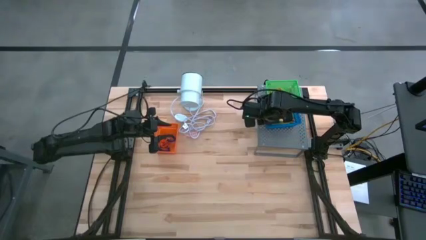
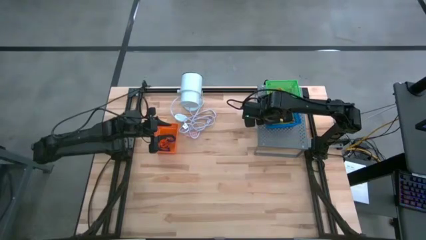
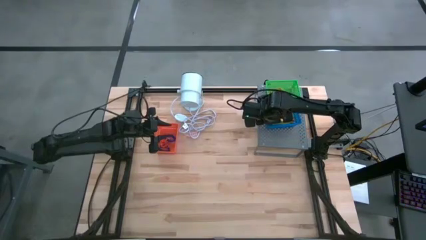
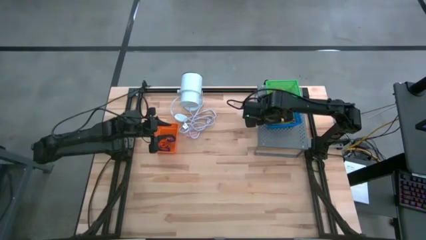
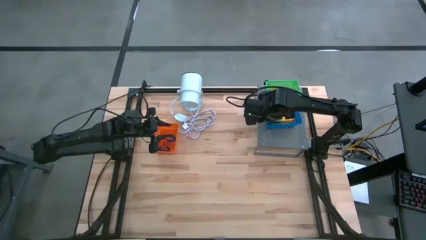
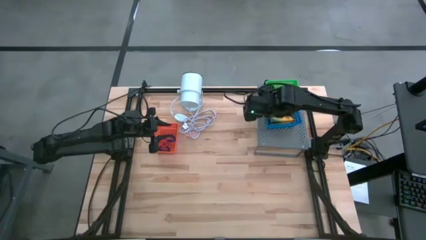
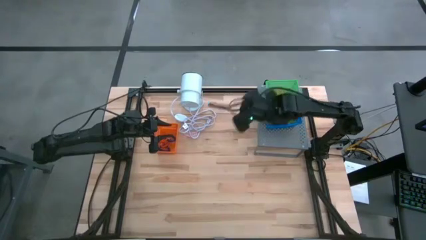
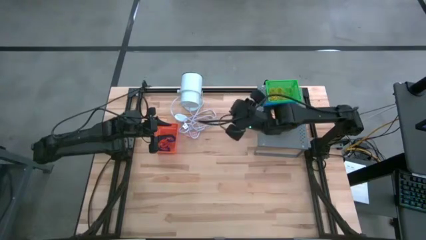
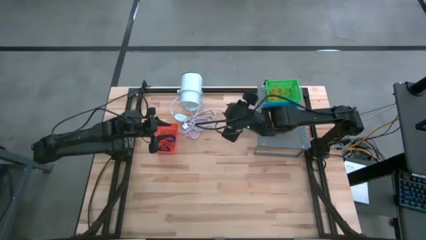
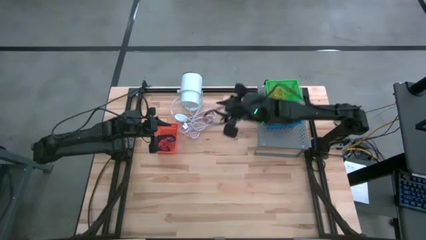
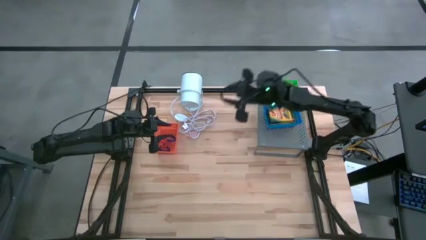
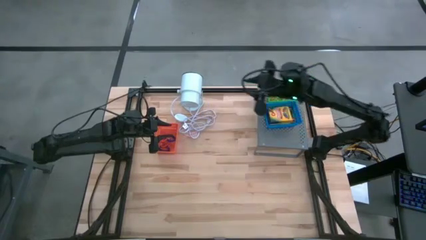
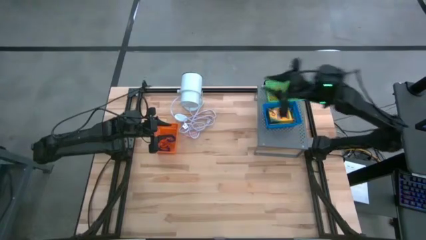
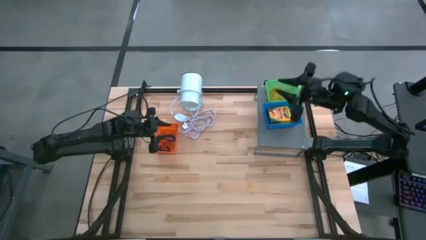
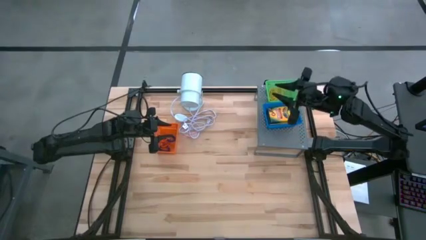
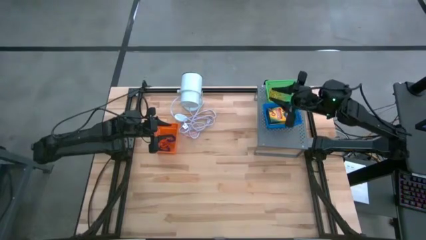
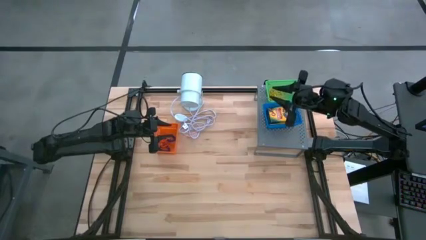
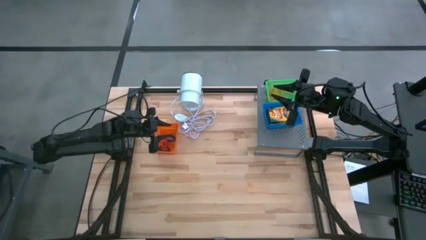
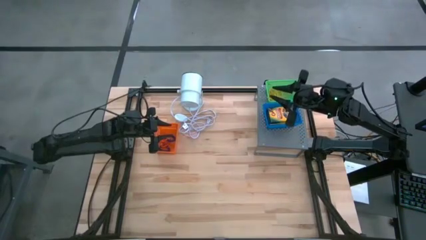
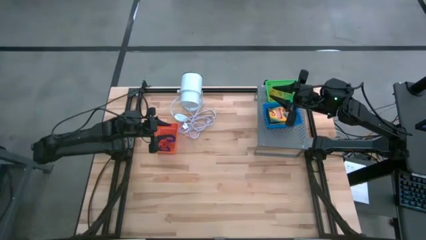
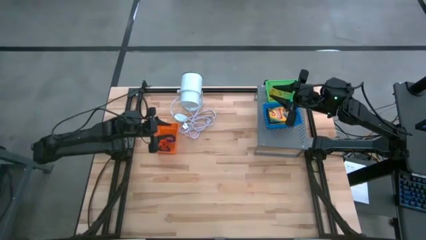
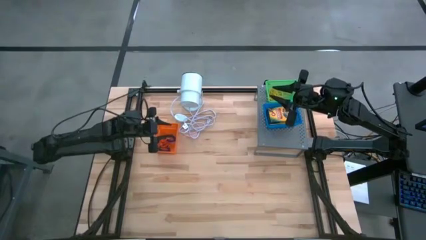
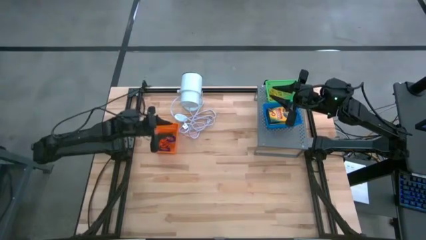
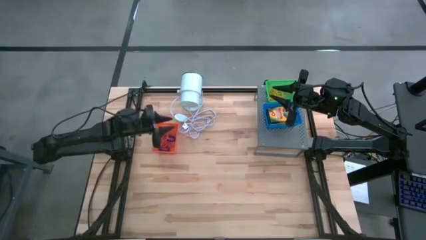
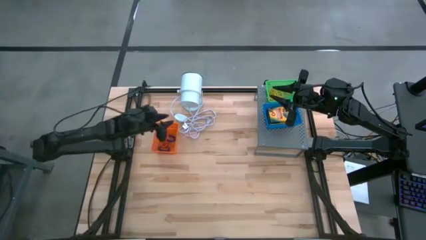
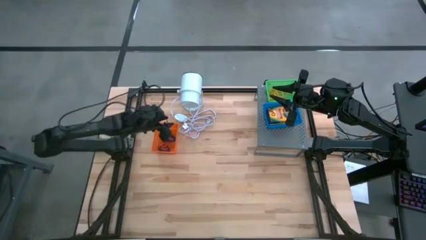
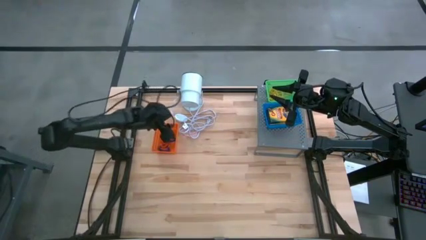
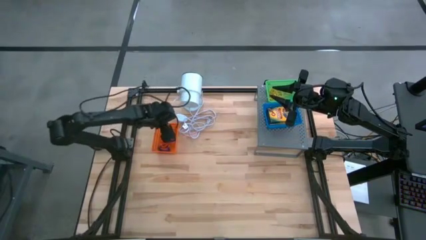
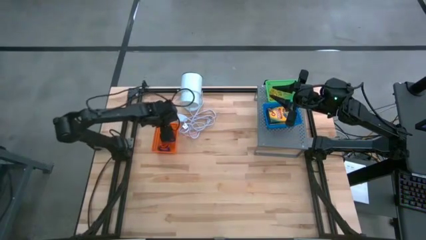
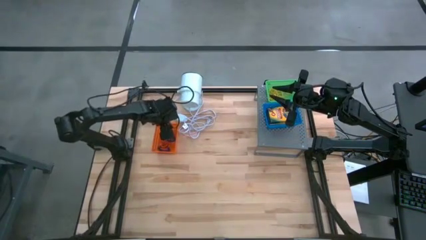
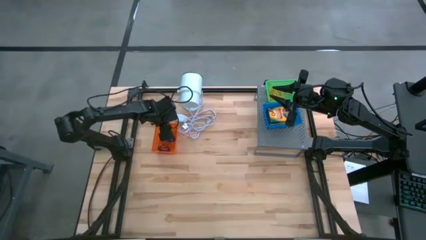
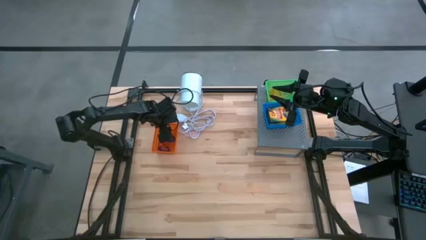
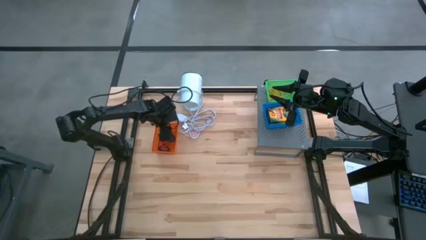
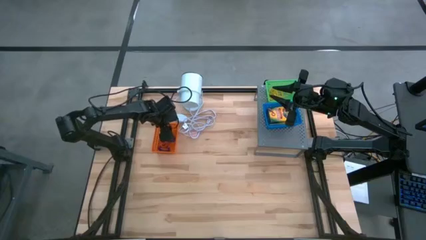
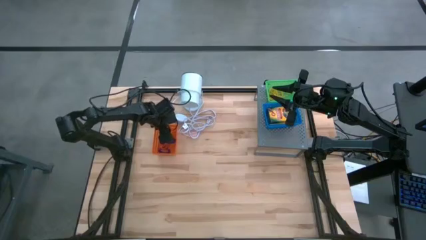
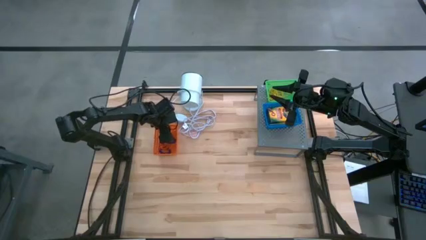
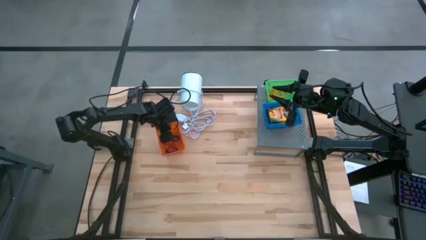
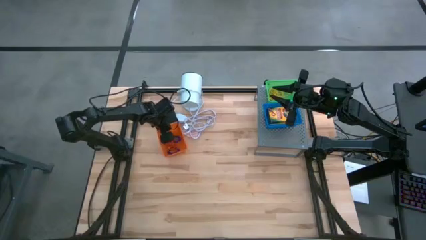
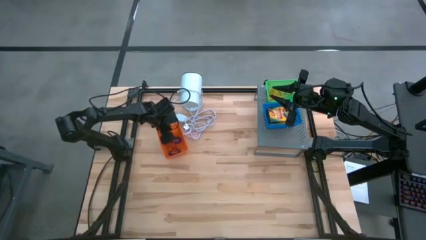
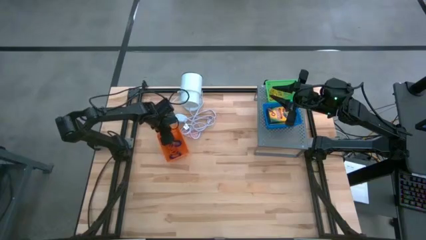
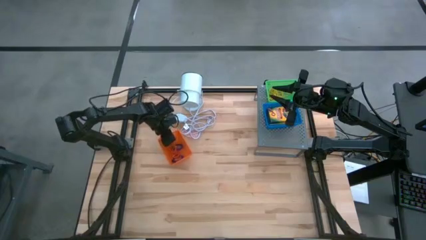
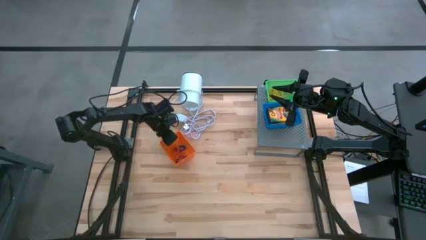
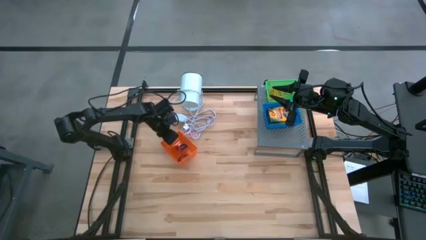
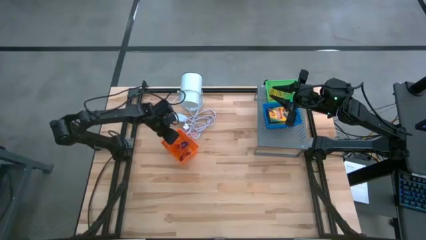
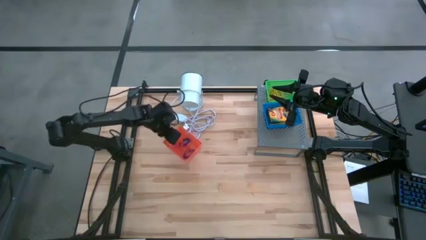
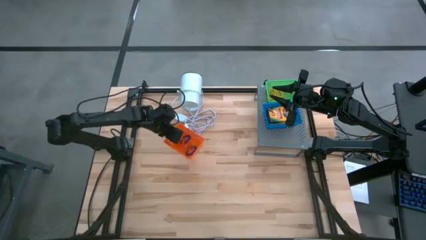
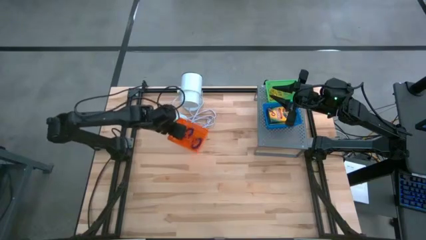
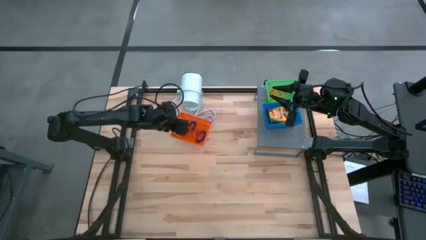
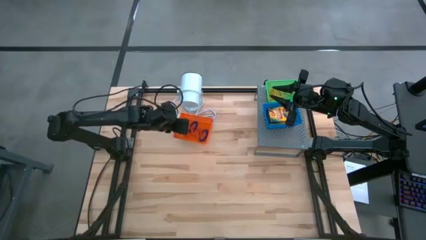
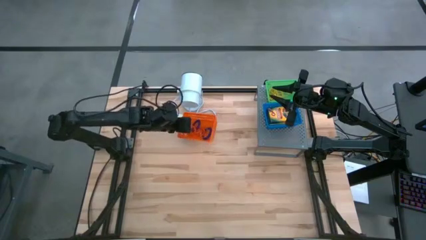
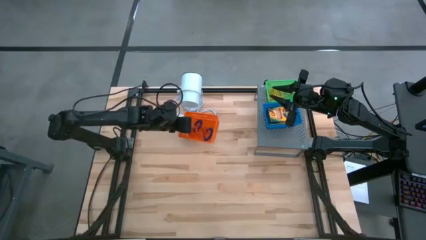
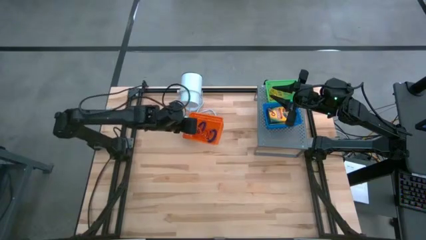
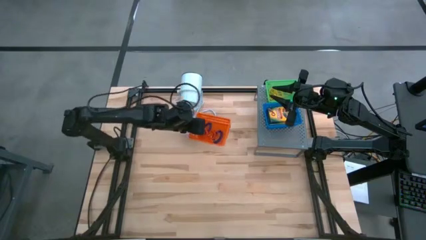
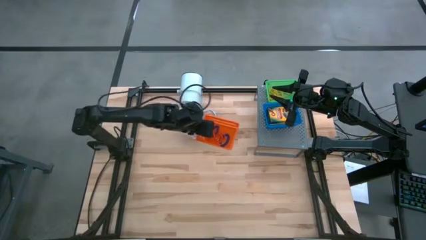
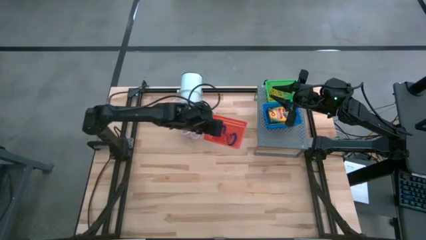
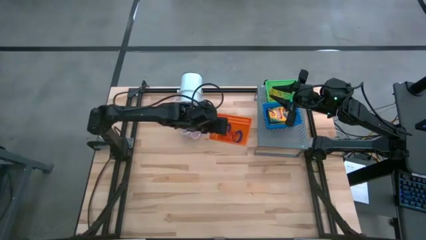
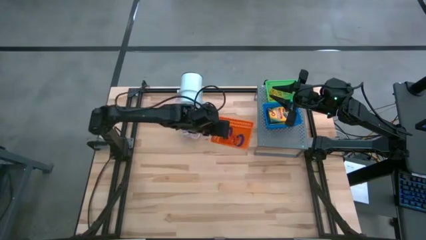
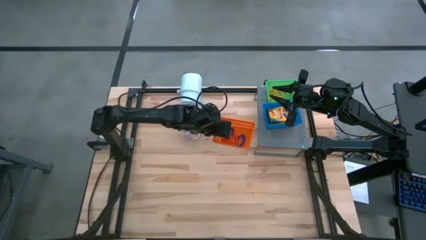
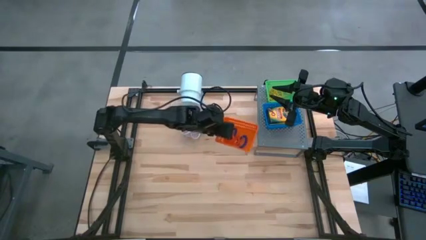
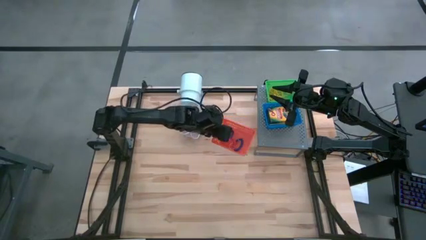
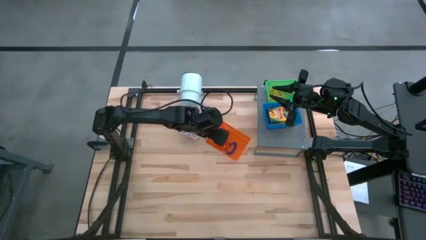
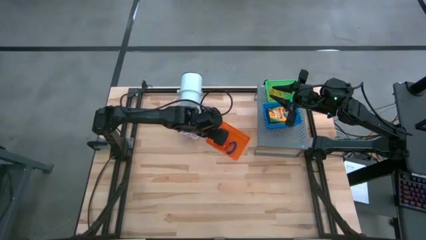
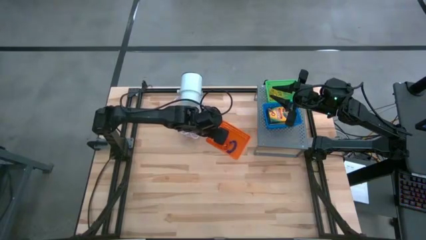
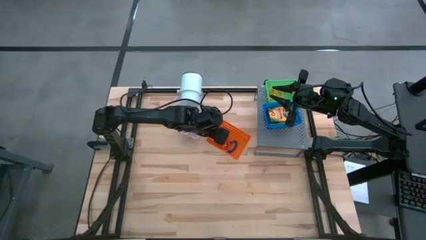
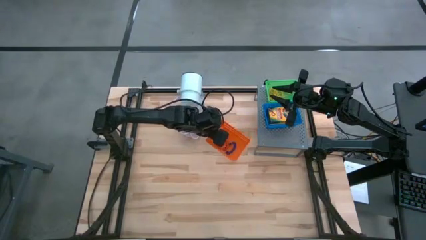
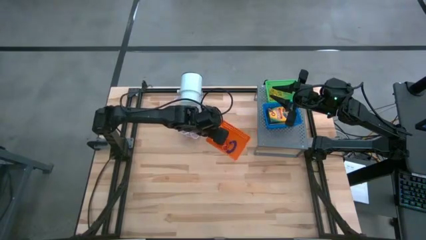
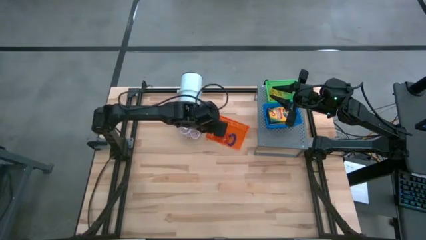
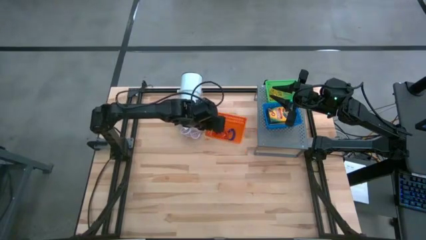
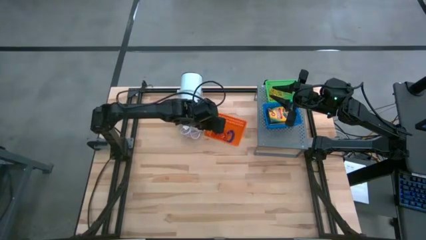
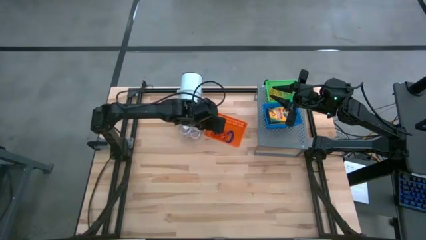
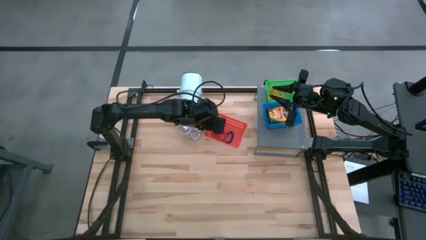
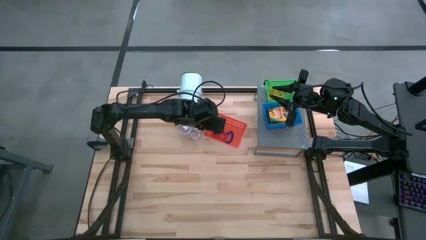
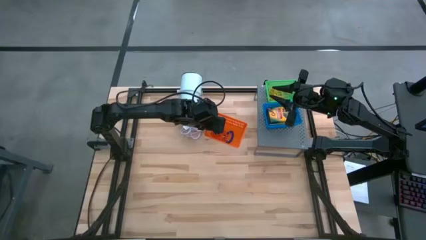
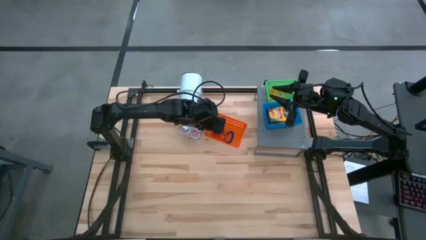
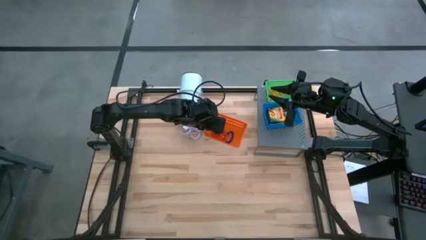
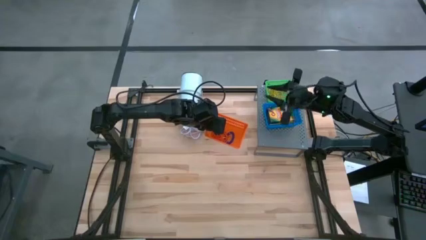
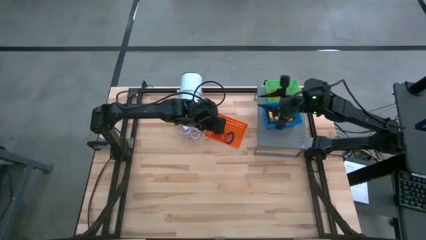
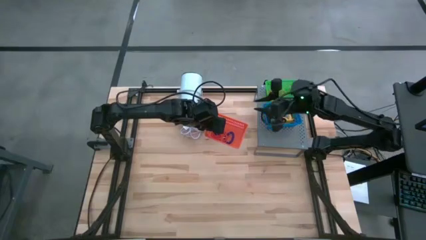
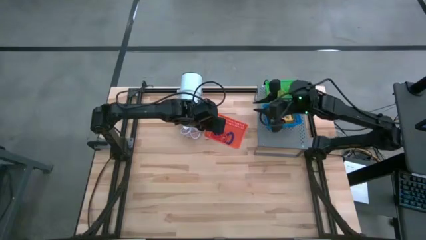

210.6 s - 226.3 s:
Task: Pick & Place Office Desk Supplies
Put the orange bin filled with spring keychains on the shelf
